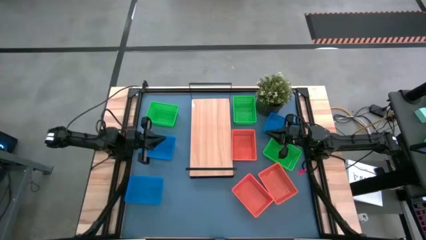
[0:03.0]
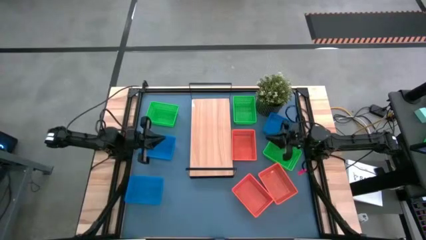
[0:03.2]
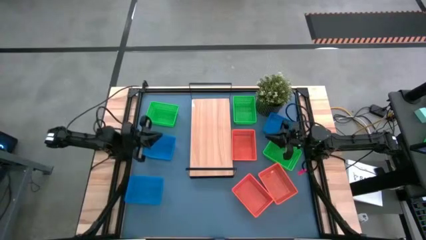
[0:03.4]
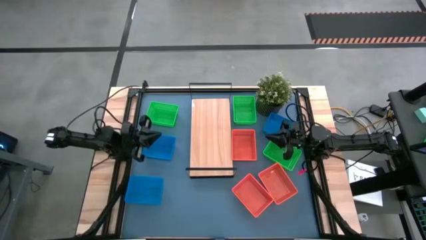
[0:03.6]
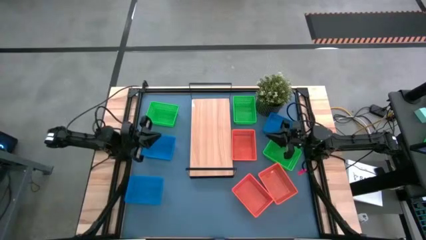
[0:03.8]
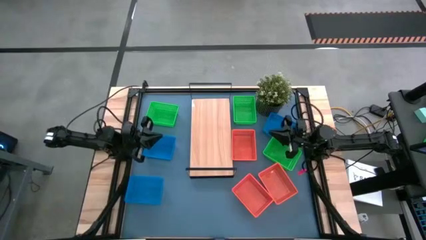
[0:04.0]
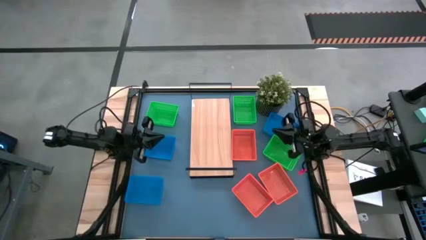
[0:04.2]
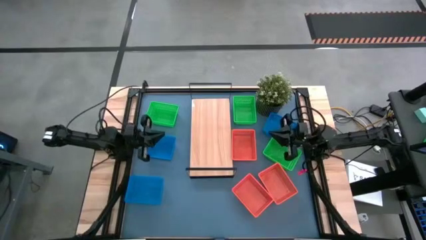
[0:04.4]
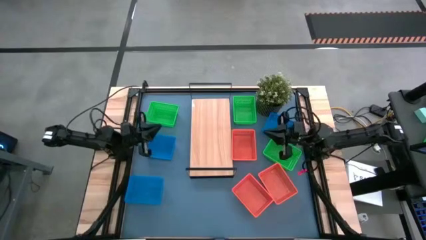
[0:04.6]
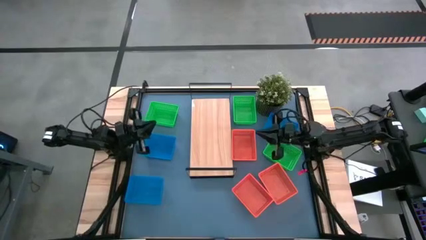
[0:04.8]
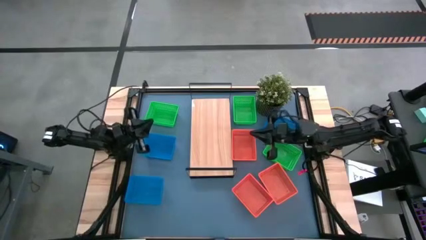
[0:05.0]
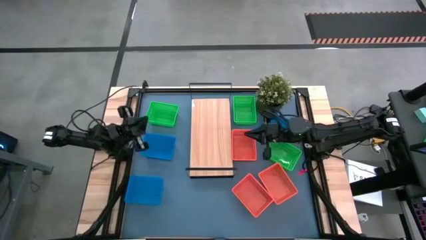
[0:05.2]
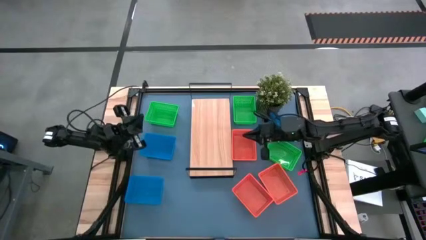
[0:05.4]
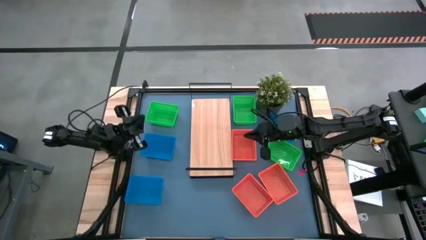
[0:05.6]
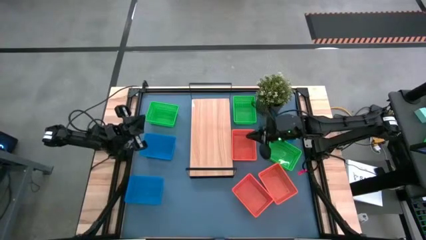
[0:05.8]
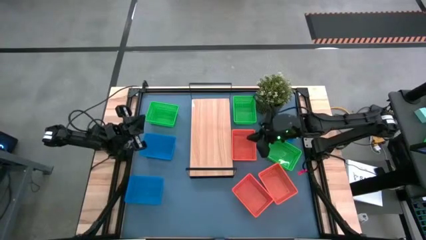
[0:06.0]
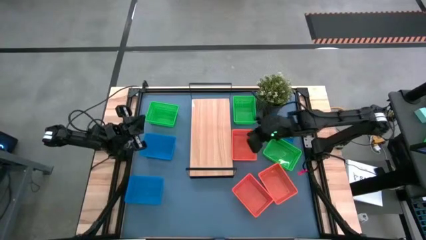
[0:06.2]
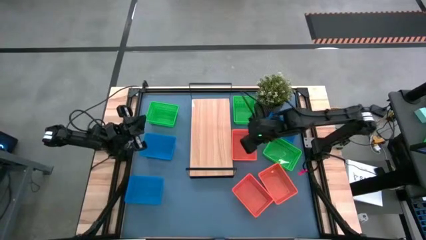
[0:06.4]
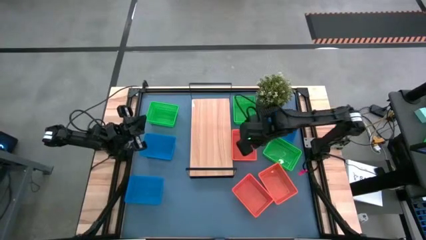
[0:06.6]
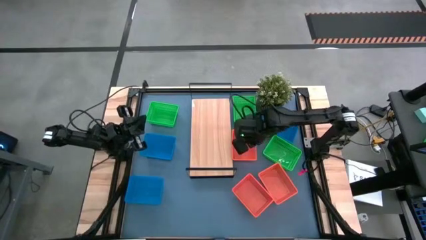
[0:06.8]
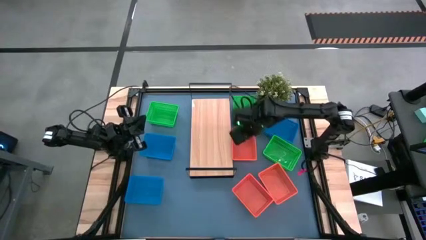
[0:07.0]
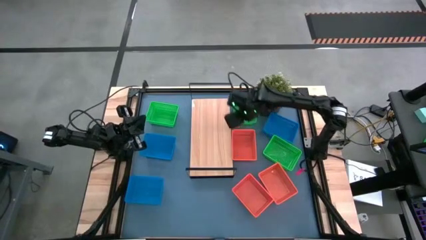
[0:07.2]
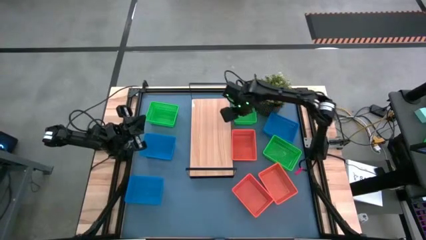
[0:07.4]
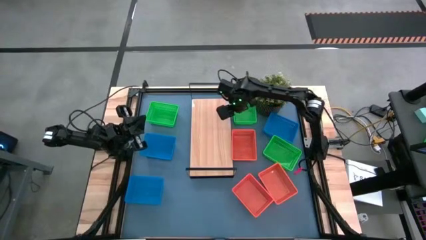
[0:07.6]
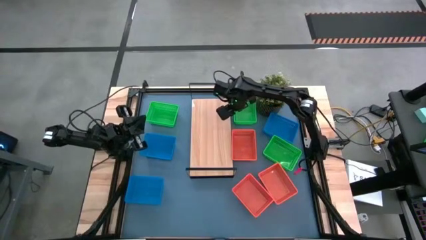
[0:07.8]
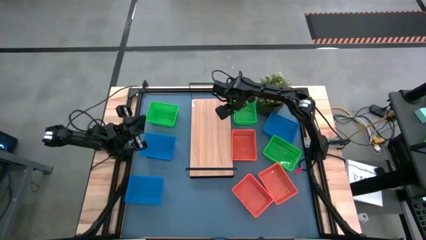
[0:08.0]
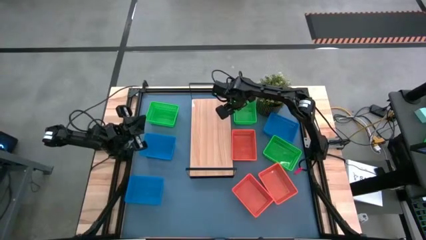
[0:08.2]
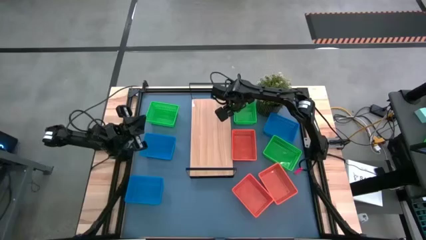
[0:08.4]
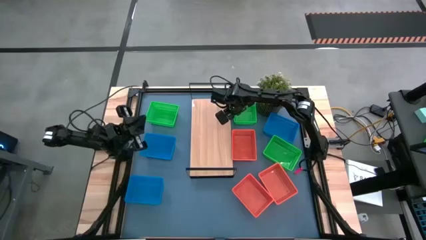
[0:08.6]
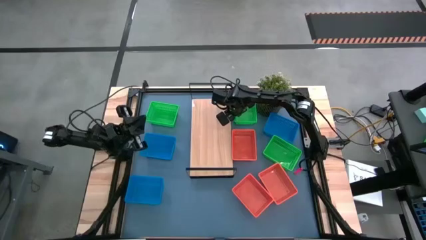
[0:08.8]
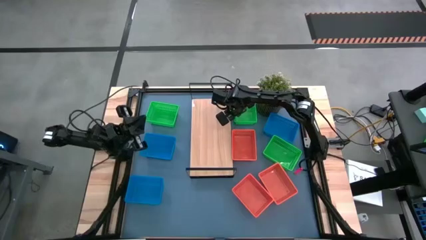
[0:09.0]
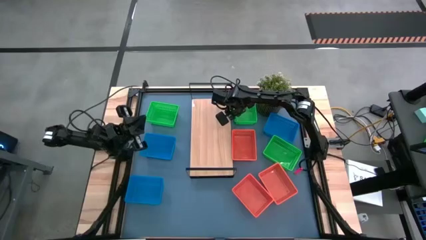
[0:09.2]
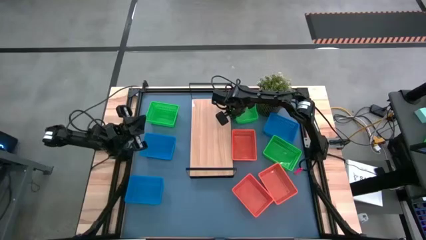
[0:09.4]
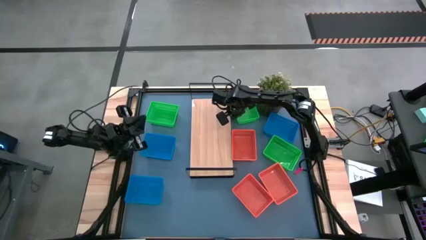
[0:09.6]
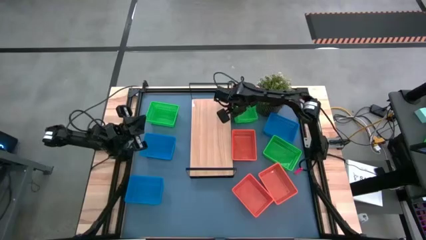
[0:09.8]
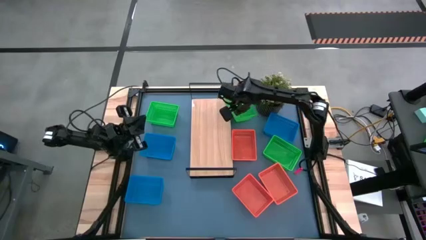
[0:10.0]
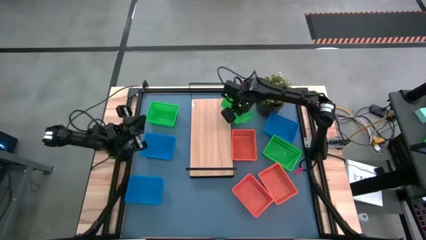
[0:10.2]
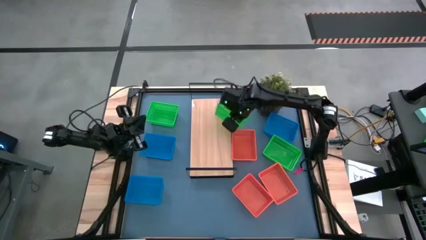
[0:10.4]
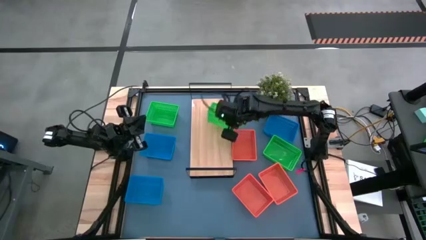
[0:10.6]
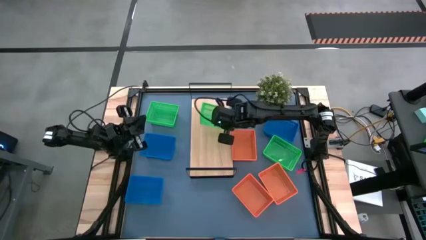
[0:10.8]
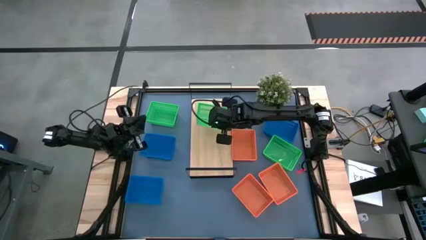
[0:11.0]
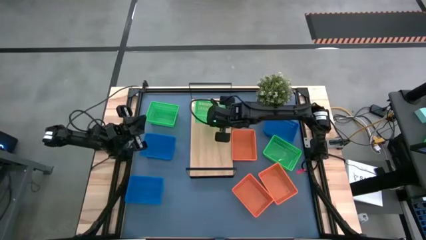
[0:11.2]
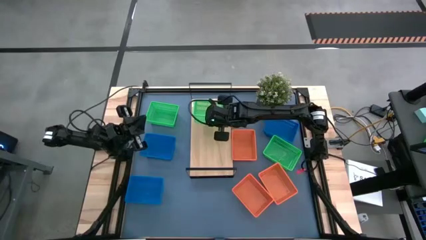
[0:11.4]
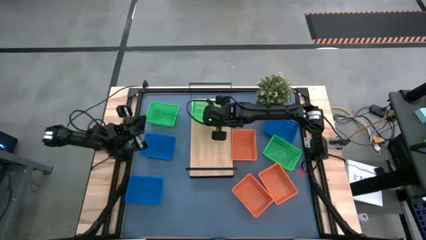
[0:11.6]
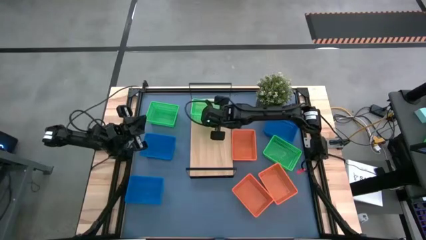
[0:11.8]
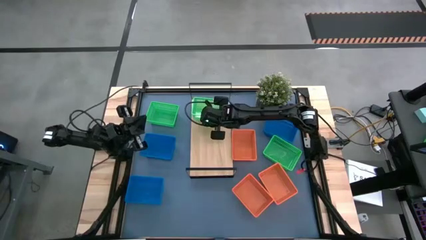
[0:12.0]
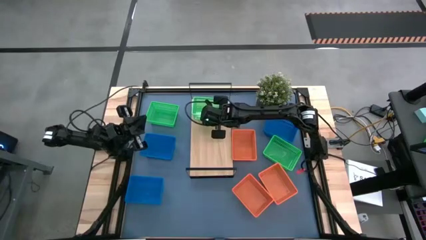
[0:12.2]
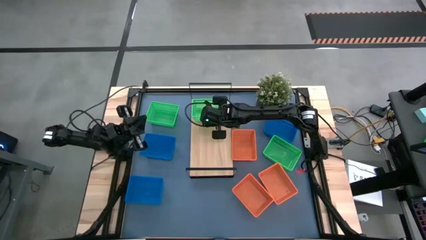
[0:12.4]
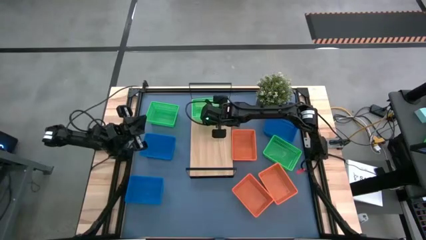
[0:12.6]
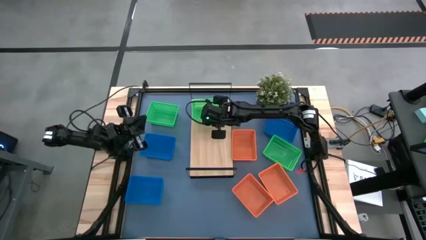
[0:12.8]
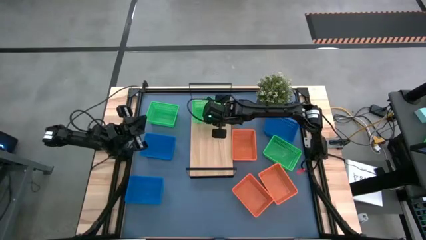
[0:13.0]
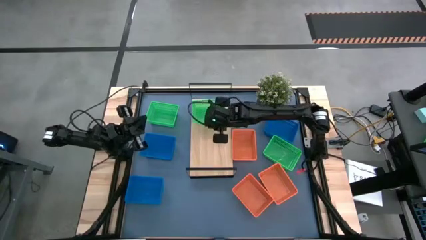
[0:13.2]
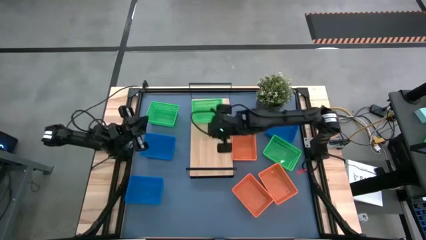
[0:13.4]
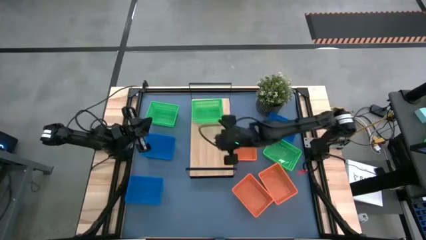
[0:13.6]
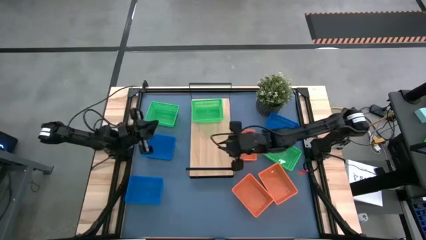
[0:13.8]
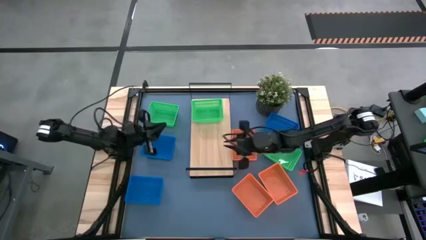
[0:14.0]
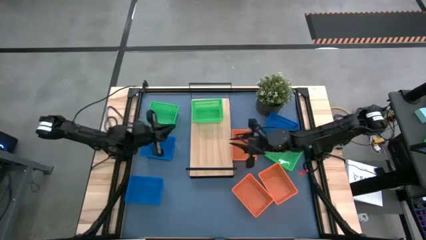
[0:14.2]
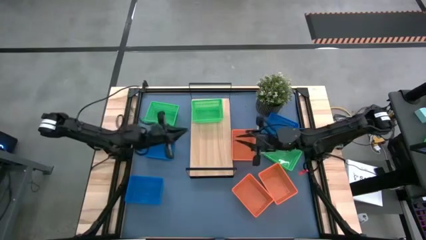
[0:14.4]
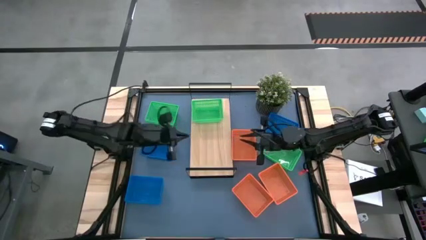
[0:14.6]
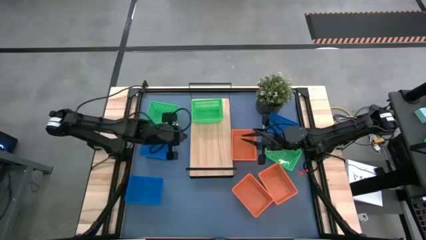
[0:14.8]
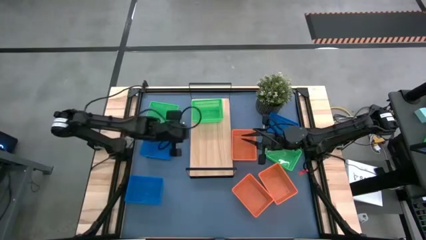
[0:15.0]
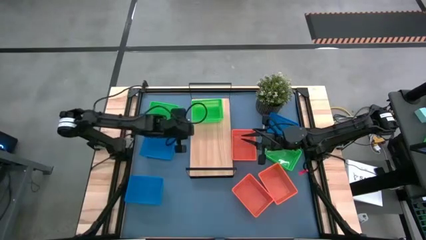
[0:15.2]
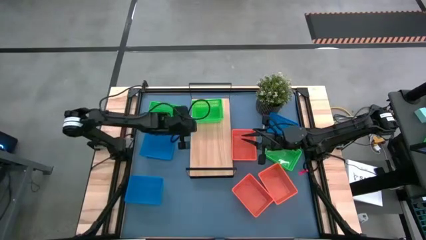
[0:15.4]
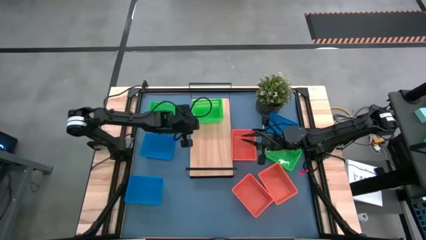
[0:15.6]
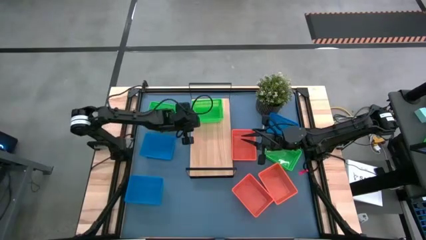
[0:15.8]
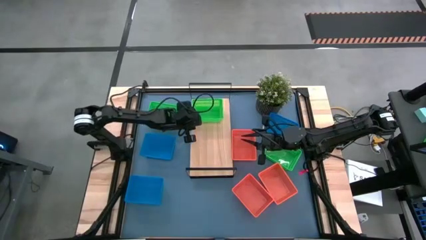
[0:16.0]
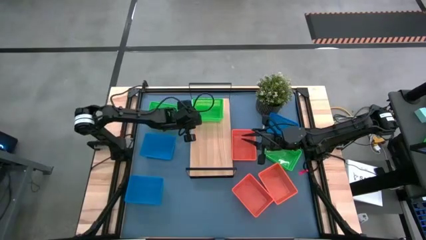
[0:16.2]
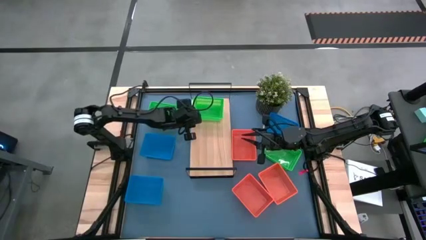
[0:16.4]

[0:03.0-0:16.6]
Task: Stack baskets on shelf by color
Put the top right green bin on the shelf
